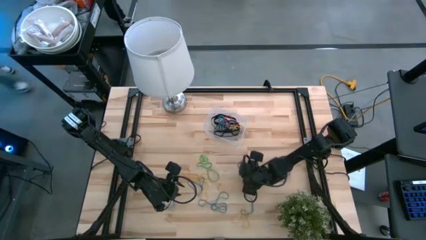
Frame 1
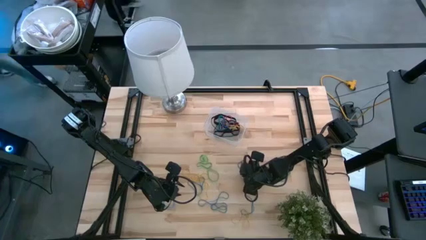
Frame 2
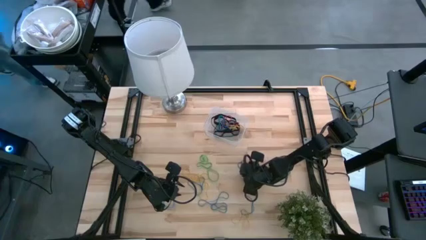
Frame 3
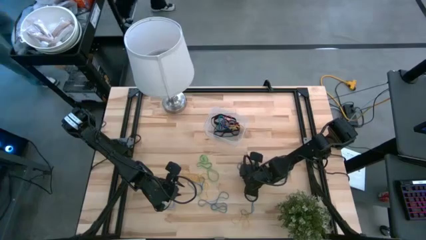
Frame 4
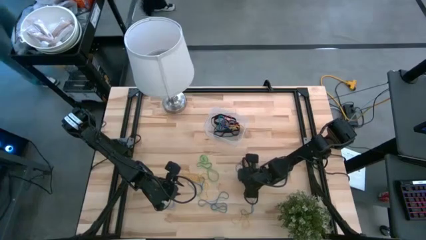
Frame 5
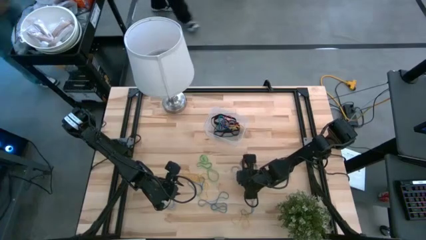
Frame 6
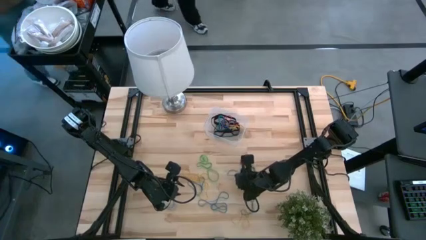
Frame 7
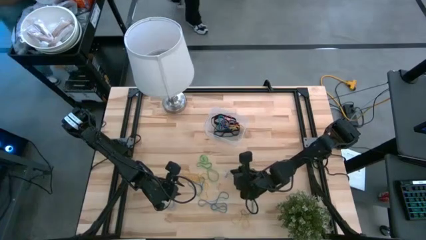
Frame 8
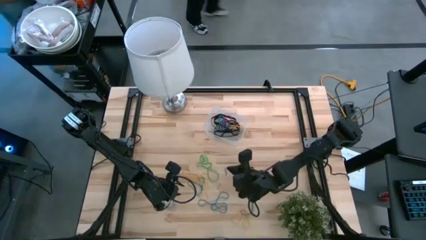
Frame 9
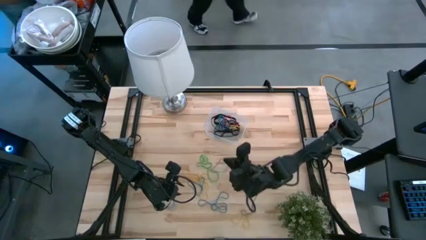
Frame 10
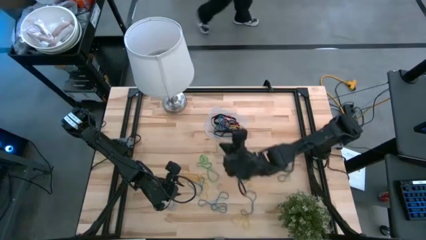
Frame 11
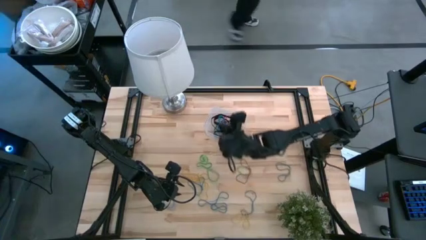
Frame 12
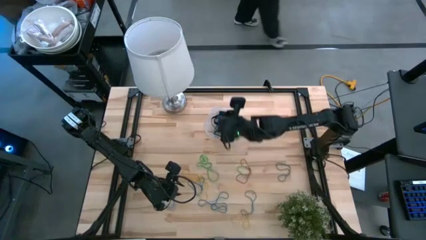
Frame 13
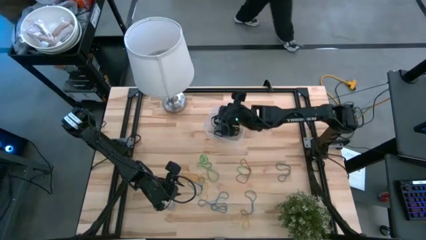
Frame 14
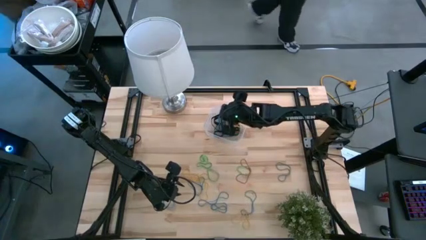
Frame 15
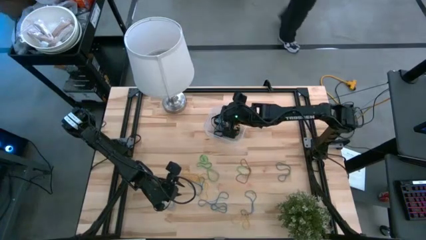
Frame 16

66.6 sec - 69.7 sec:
Task: Pick and place rubber bands into bin
Put the blue rubber bands into the bin

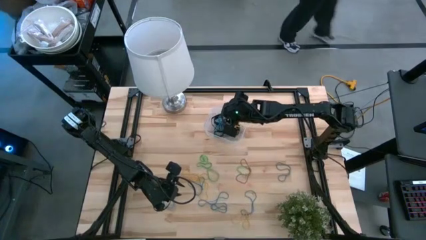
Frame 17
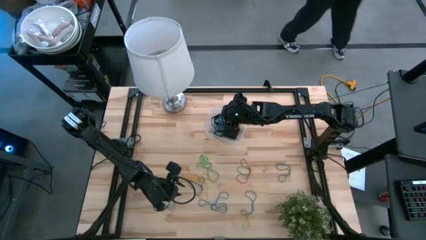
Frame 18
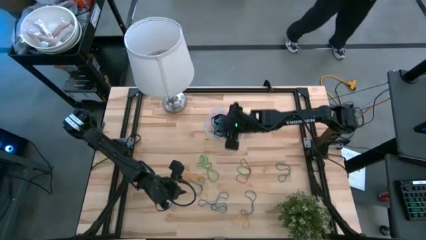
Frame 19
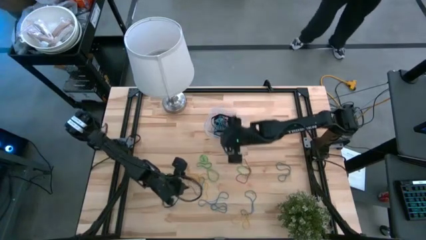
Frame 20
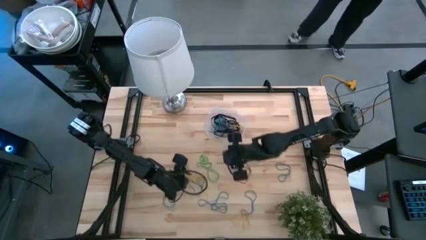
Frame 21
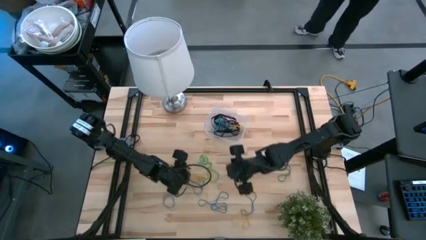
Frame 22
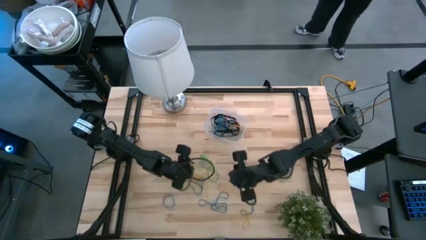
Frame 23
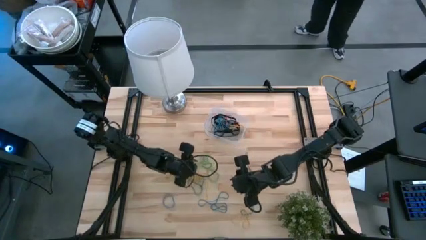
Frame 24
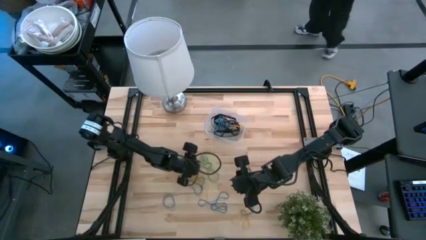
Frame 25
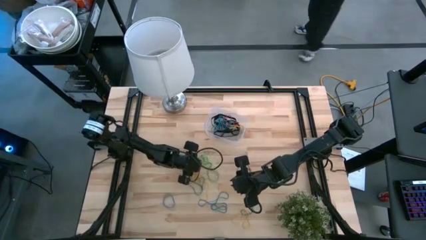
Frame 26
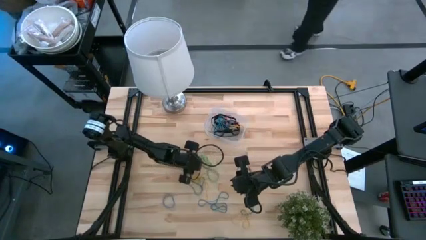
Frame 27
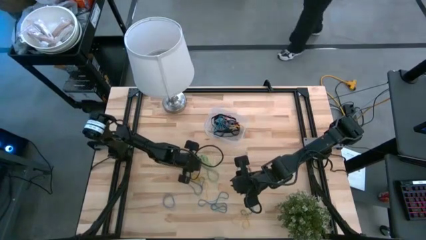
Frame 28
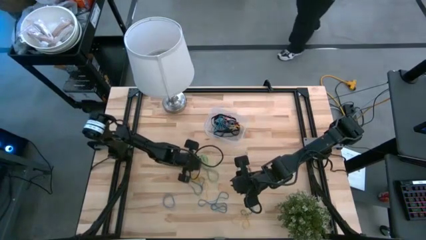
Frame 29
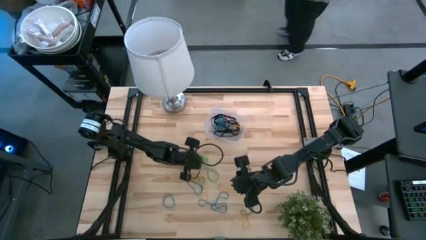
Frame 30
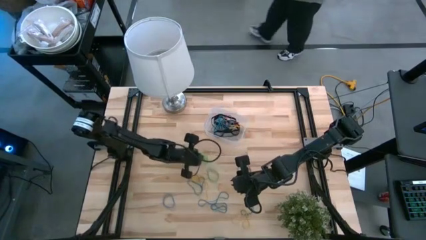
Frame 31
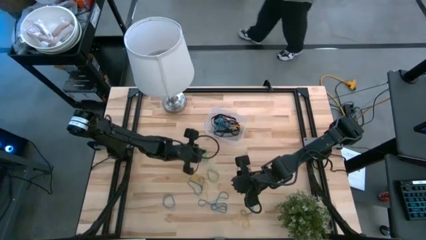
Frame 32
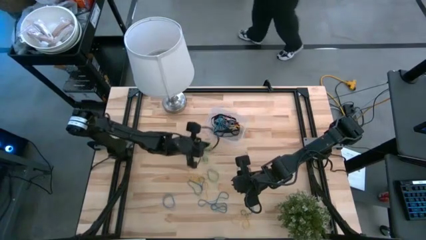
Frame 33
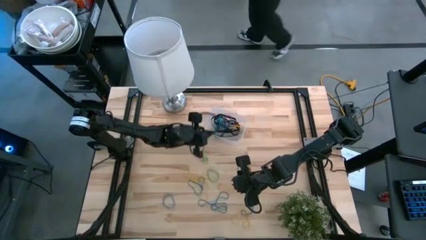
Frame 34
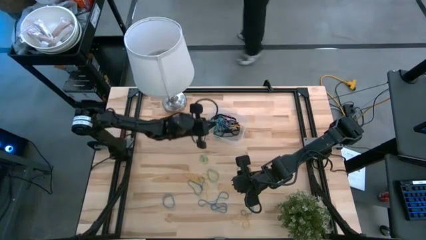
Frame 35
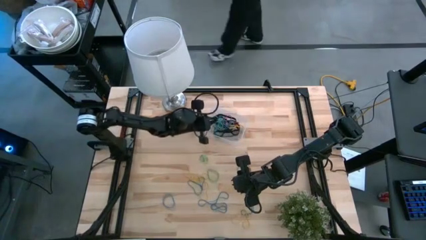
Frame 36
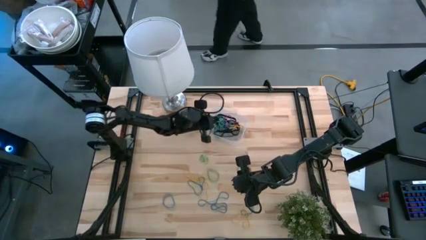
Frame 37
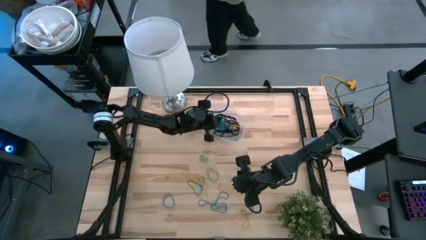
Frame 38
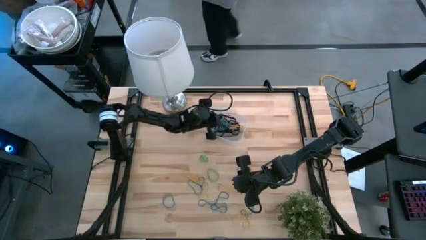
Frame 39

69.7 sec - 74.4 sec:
Put the green rubber bands into the bin

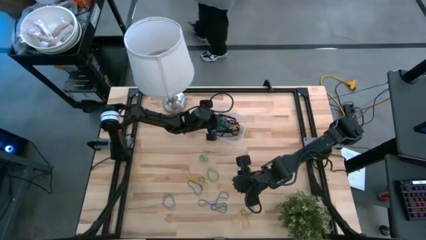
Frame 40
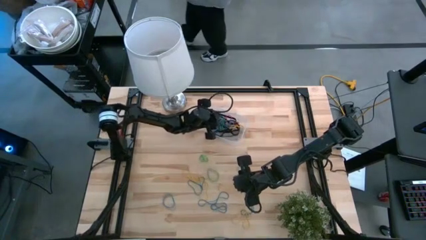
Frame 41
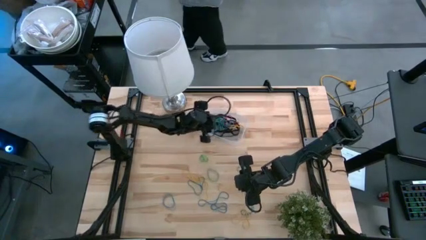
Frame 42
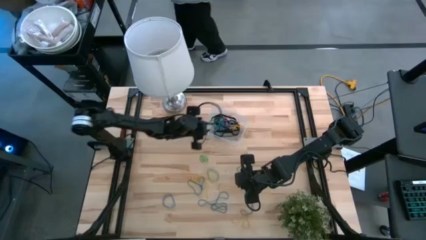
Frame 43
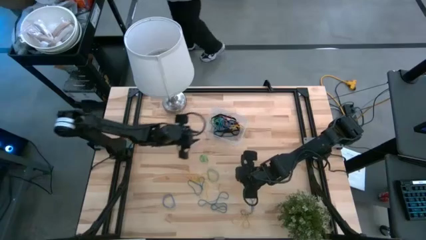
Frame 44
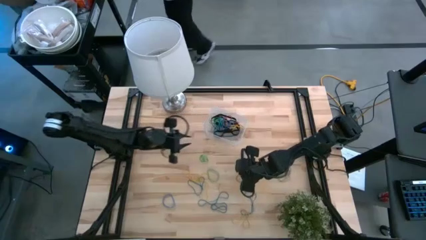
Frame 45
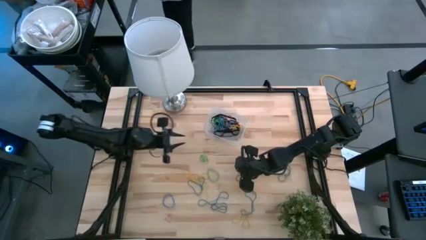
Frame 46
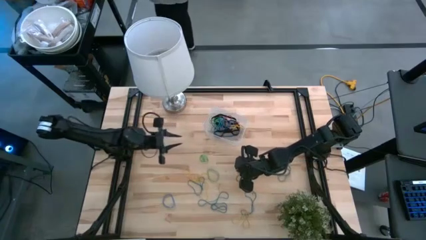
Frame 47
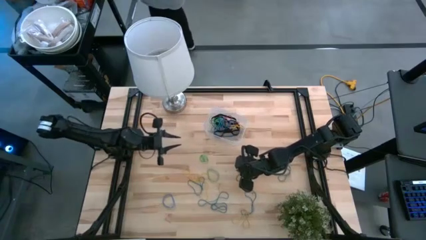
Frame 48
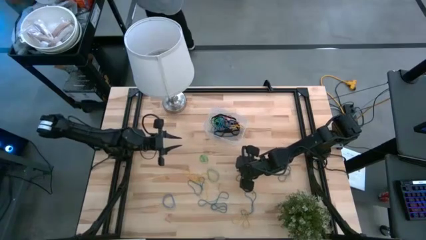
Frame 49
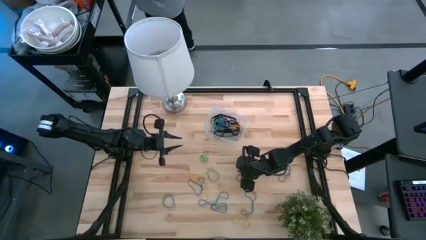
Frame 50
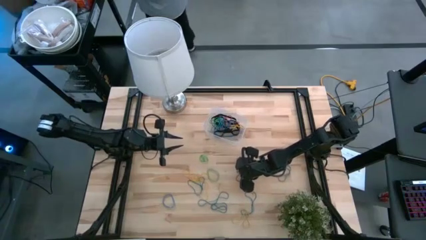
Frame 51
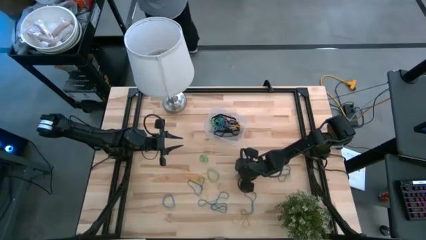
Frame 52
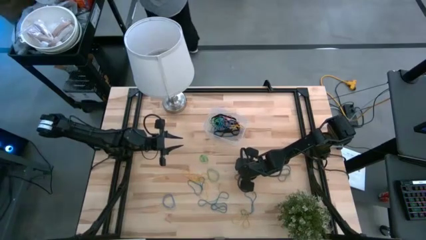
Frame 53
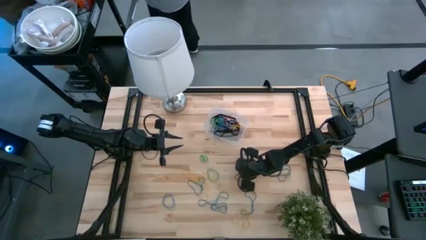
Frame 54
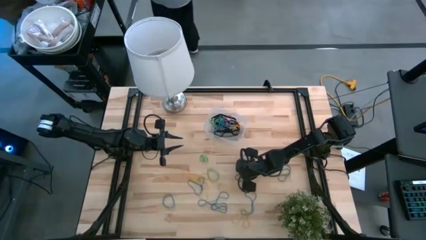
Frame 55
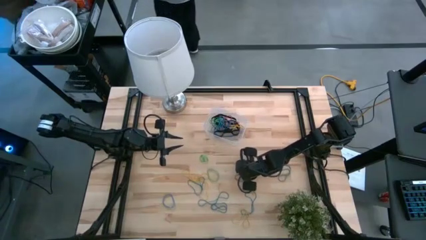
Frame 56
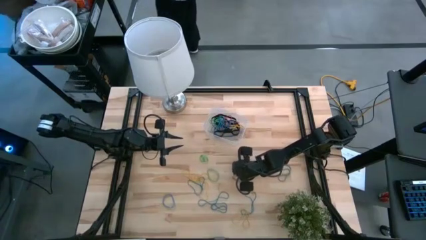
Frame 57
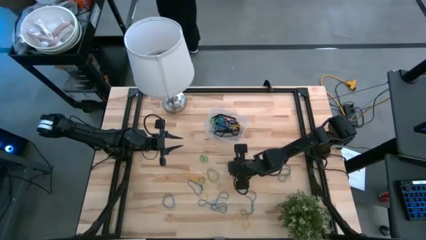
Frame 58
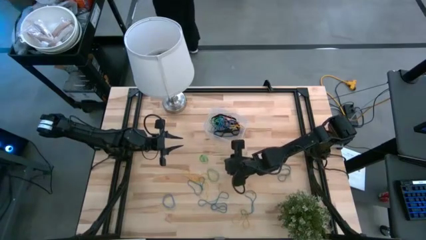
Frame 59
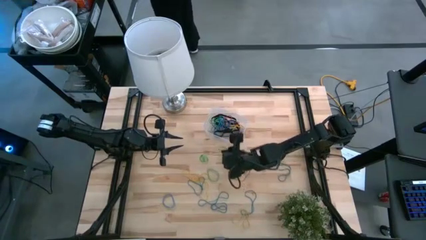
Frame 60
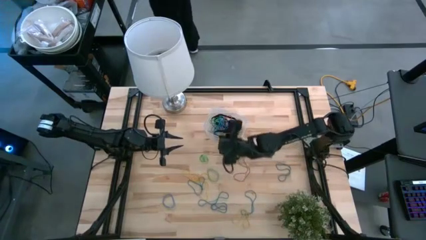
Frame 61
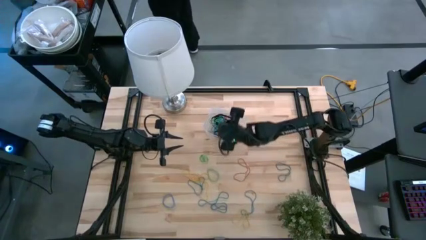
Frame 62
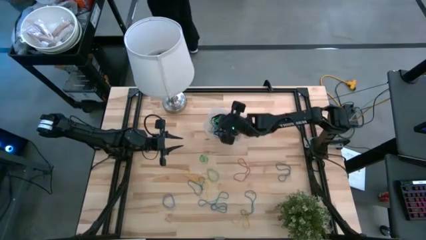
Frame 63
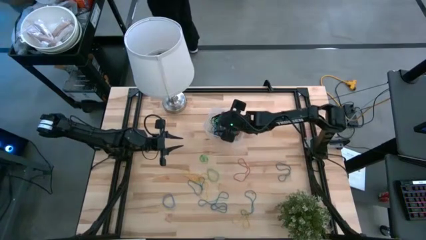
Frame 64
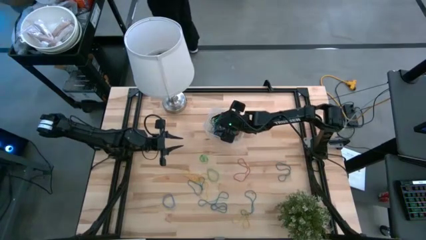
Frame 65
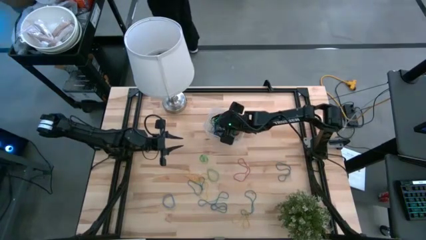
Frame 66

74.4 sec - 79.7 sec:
Put the green rubber bands into the bin

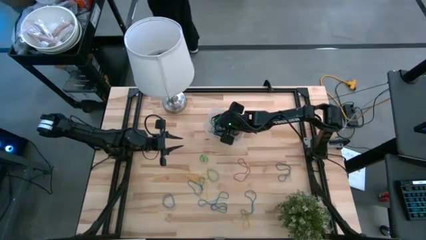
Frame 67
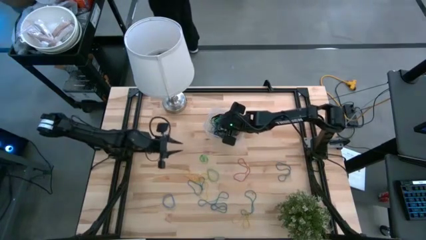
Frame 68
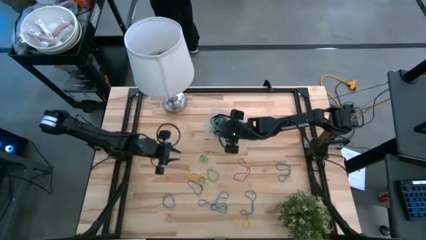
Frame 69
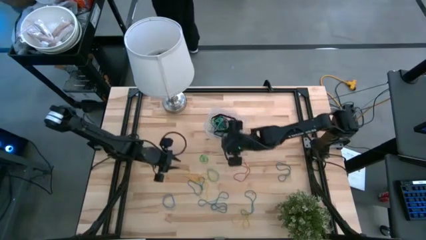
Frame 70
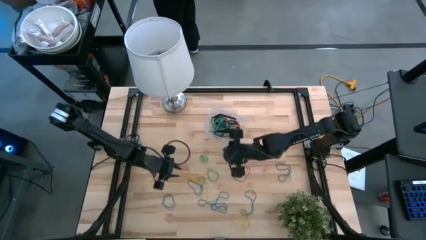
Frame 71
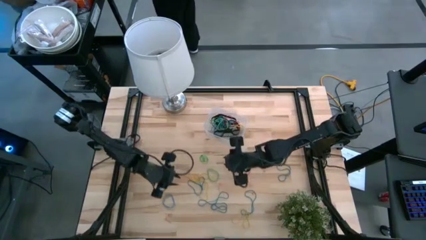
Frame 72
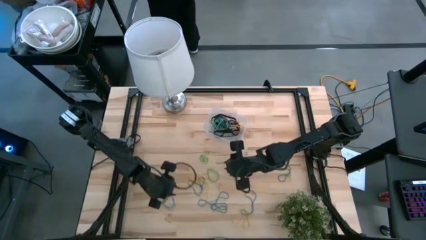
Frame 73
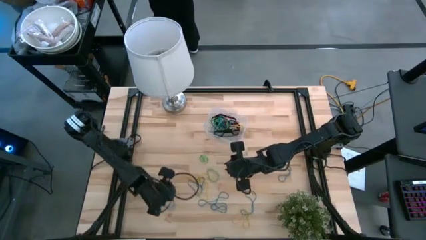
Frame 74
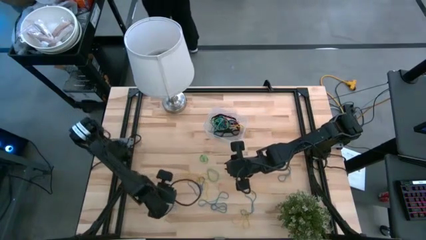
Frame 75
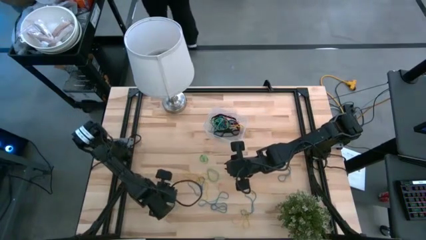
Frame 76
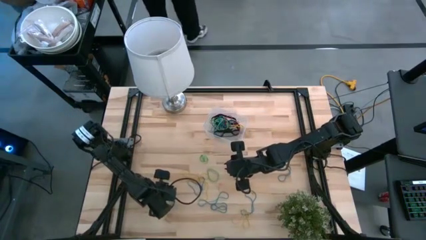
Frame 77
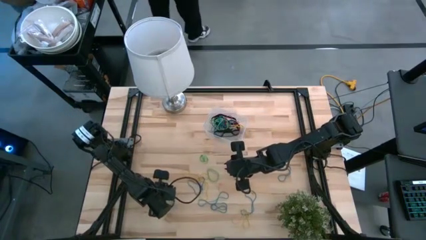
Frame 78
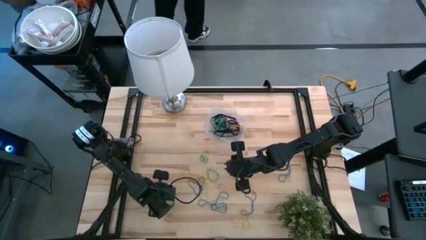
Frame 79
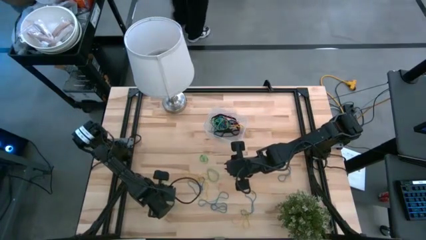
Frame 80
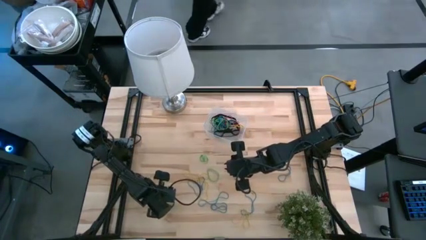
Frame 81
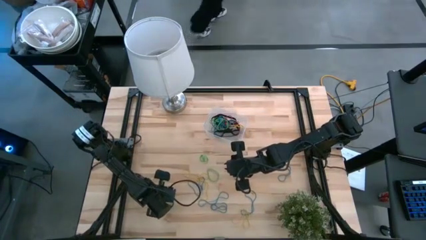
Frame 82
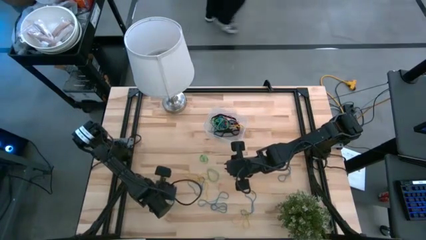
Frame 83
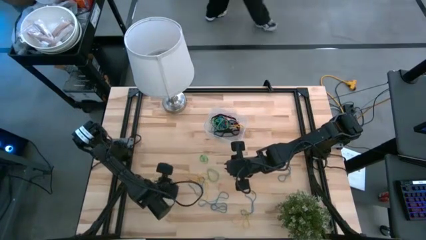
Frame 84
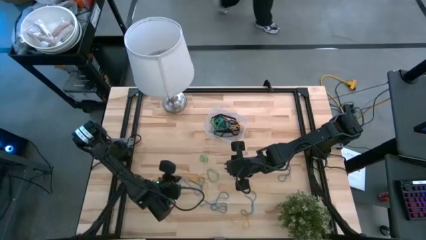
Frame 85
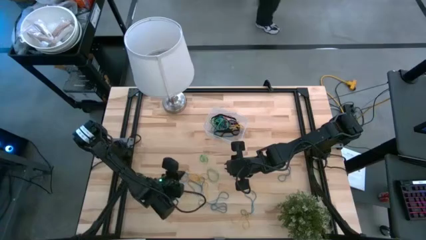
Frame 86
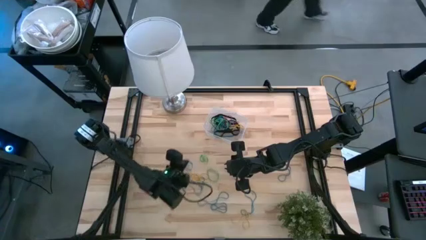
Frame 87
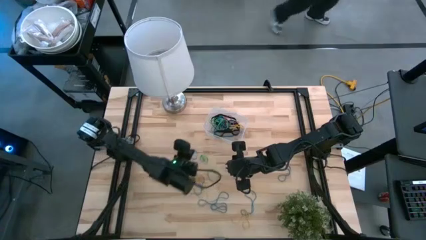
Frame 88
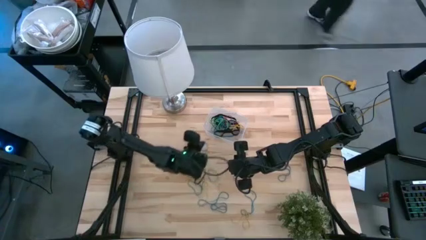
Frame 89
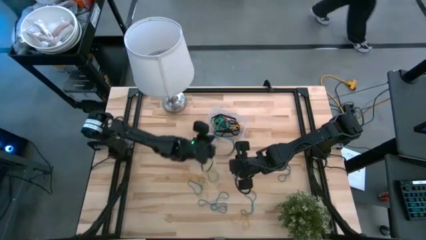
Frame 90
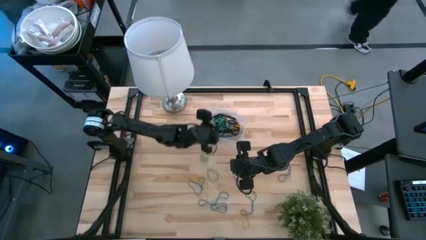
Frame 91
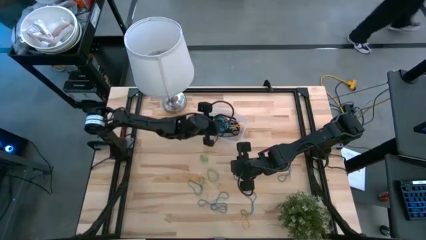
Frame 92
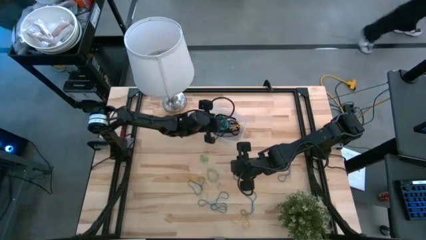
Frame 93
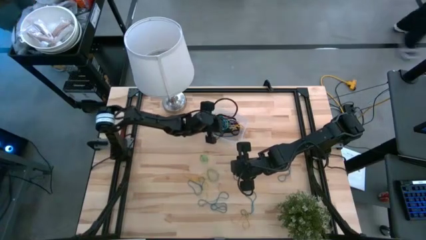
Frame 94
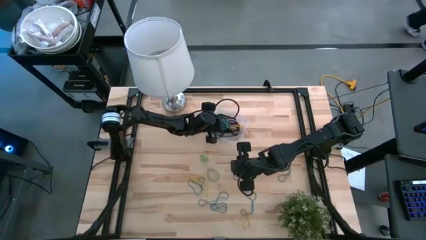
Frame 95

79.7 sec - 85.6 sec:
Put the blue rubber bands into the bin
